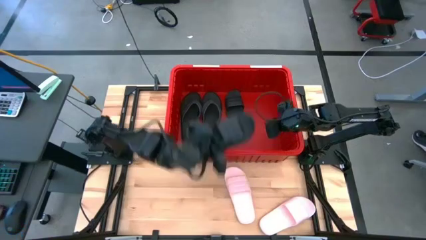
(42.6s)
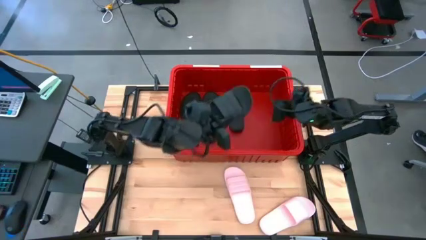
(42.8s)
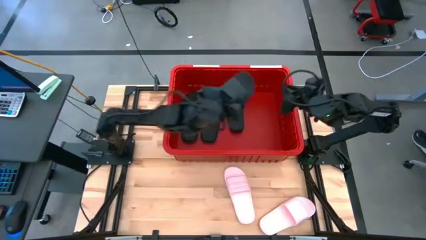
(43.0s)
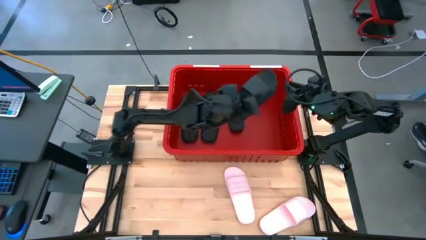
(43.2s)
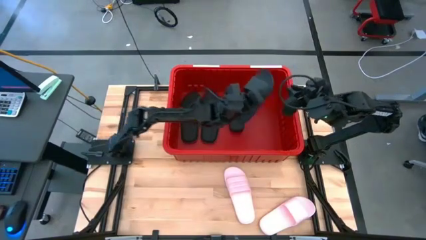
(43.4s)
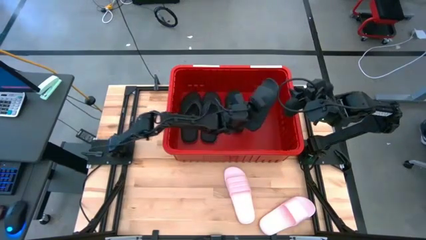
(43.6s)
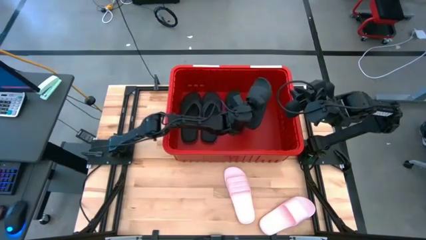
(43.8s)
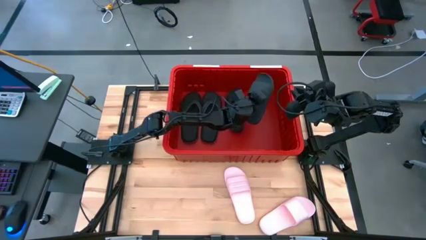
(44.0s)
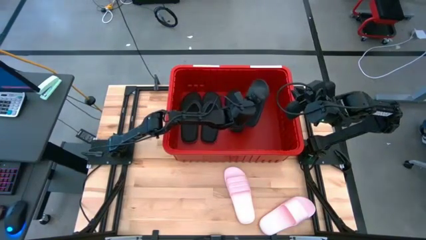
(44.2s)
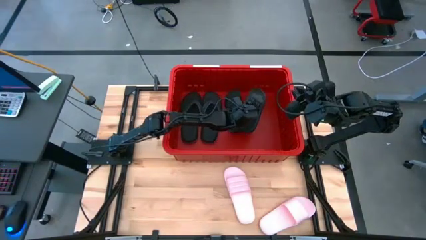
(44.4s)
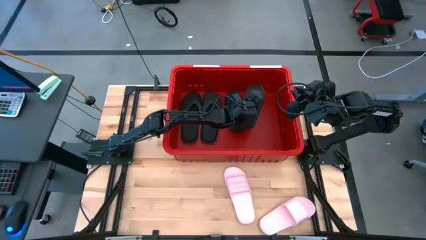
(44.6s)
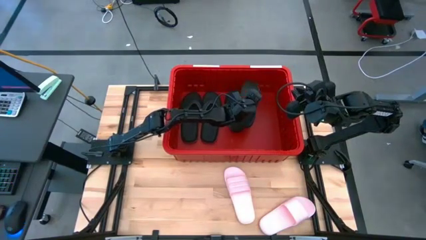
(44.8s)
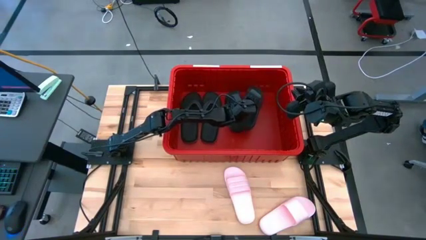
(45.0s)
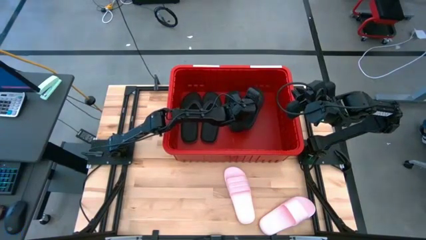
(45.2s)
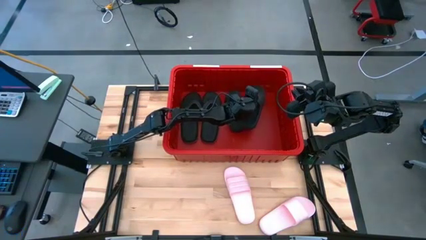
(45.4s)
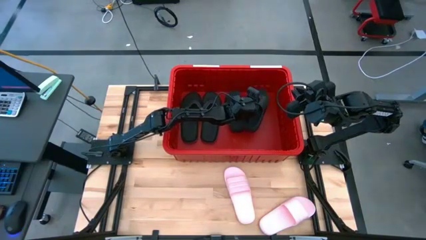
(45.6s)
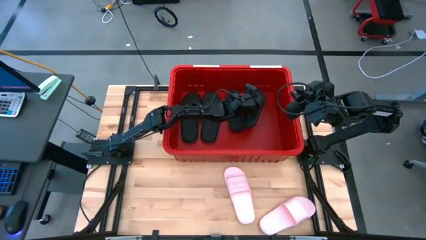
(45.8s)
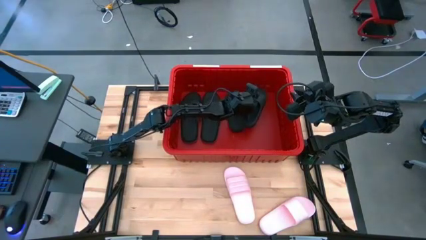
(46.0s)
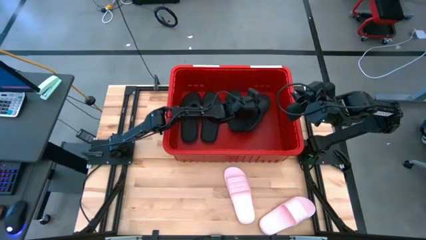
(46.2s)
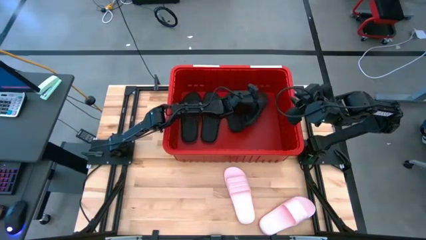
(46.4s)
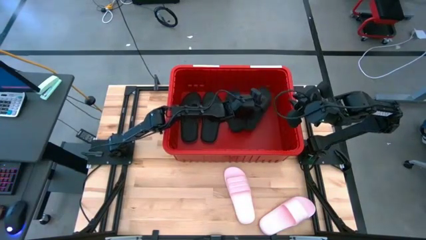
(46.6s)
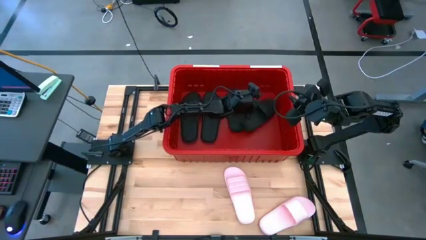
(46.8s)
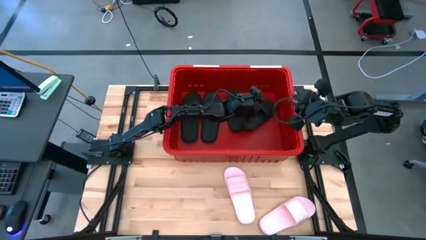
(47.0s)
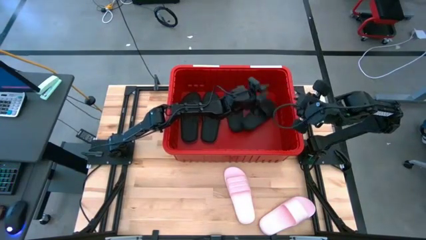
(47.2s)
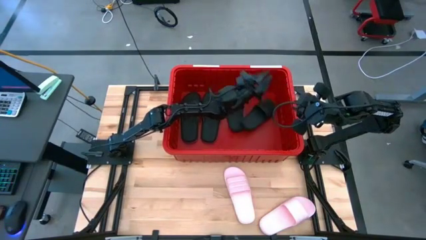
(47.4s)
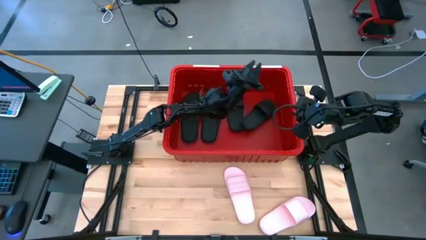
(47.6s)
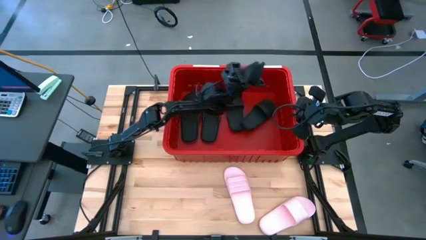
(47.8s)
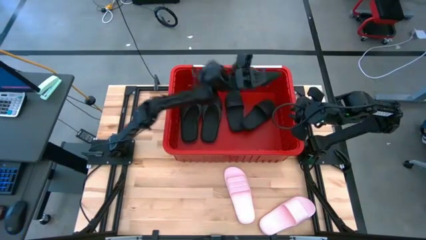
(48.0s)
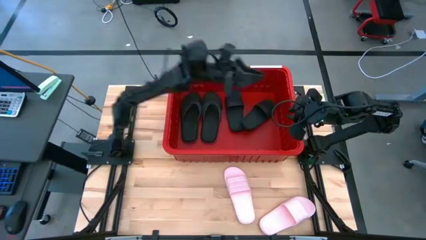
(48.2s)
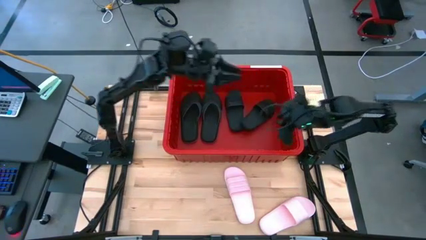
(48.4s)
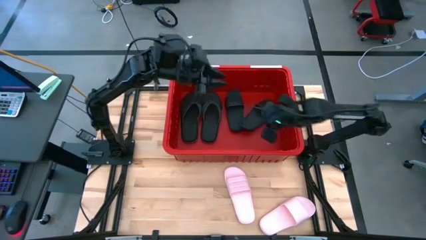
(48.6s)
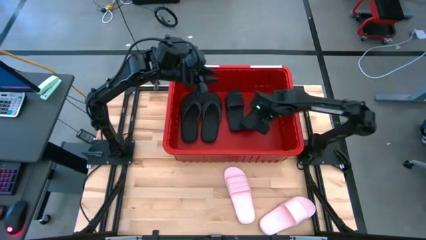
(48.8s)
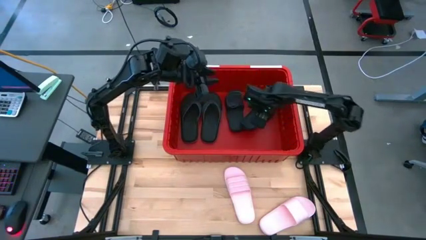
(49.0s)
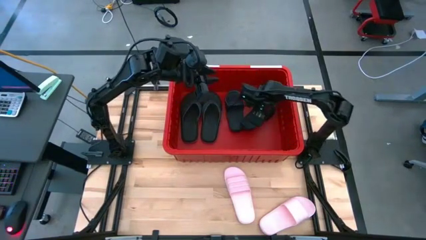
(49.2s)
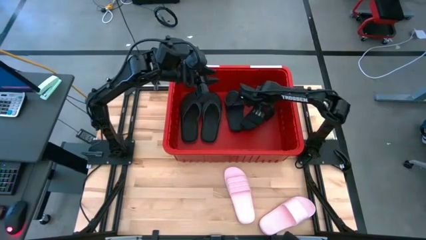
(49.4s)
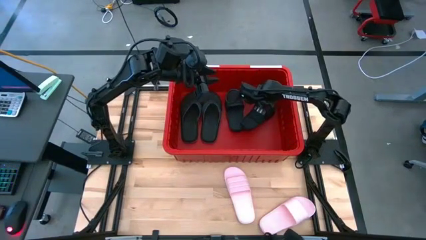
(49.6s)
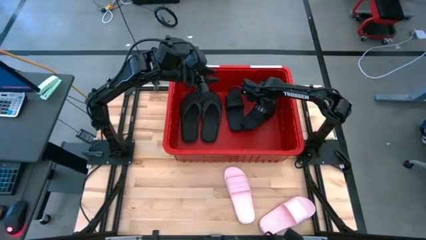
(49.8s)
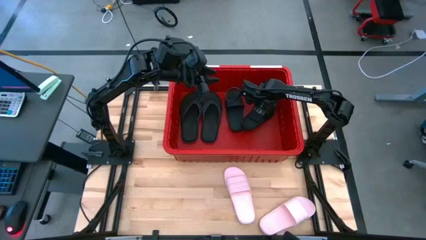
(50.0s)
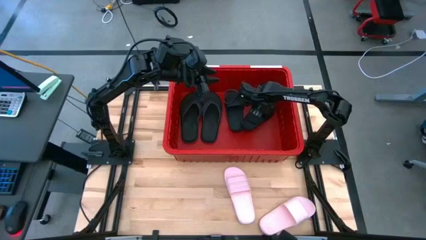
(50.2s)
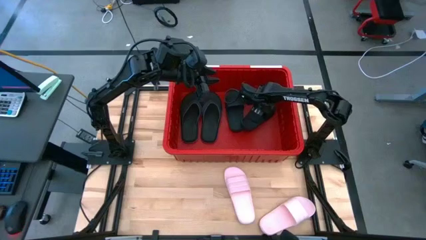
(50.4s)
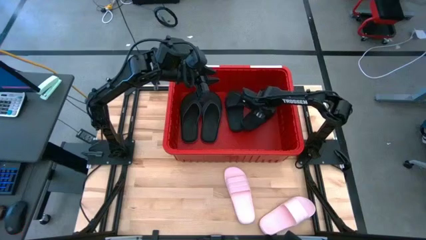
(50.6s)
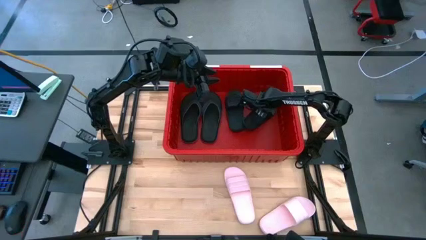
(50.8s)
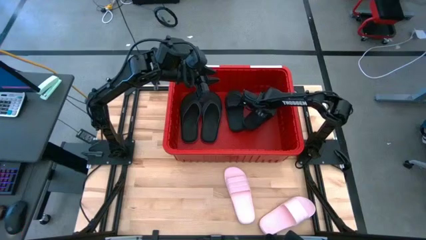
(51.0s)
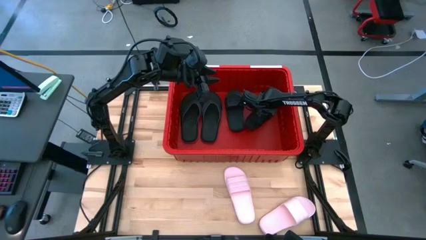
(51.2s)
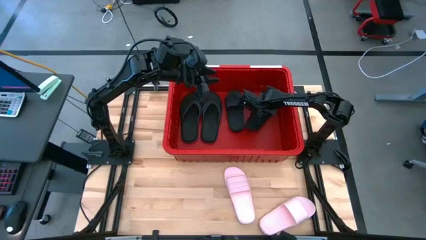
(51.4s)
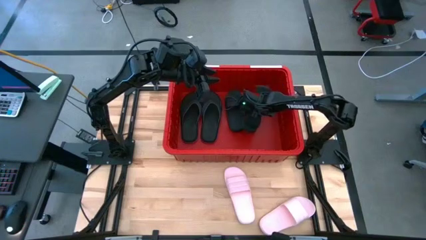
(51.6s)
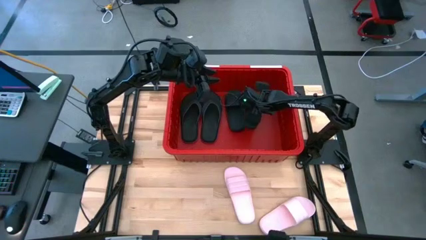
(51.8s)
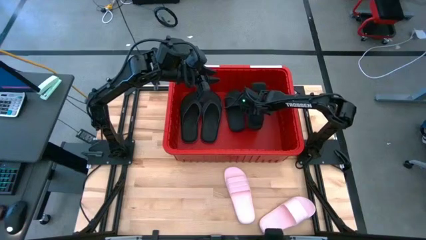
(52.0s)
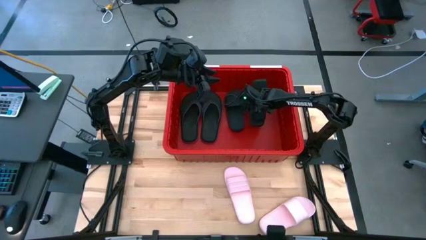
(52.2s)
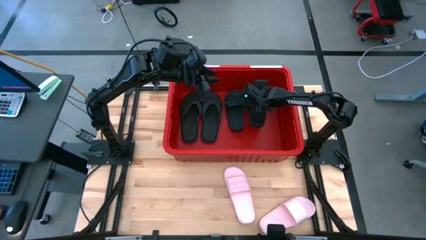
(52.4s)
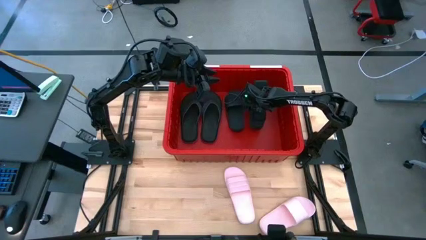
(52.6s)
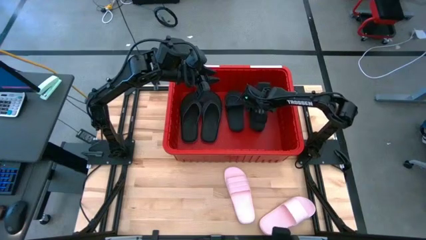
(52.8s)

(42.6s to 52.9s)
Task: Pick and place slides into bin
Put the black slide into the red bin

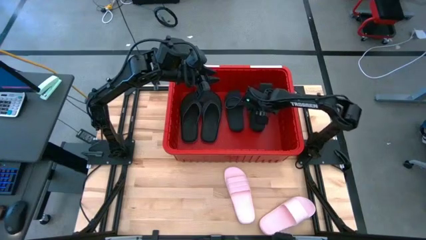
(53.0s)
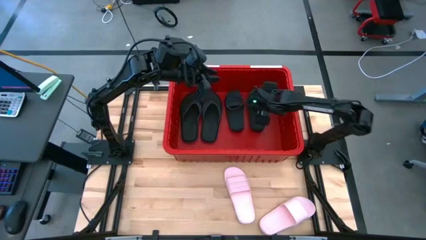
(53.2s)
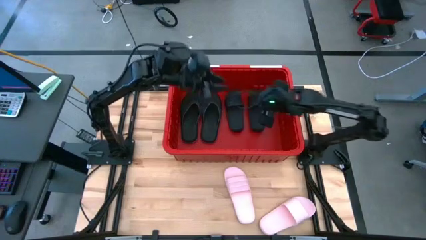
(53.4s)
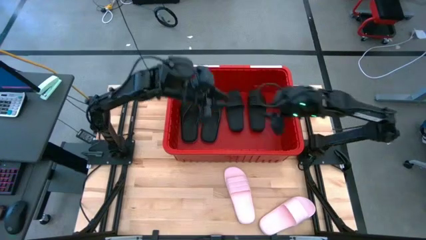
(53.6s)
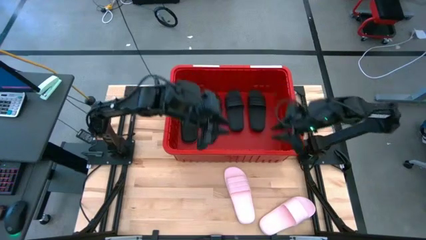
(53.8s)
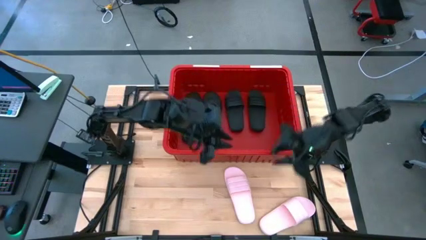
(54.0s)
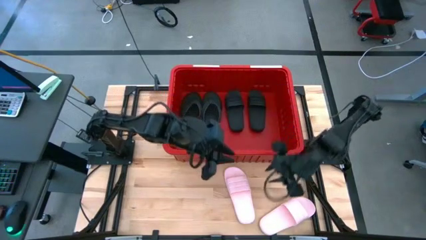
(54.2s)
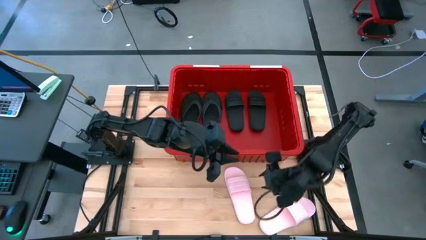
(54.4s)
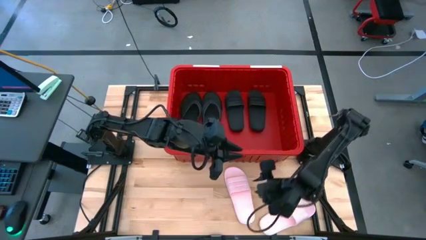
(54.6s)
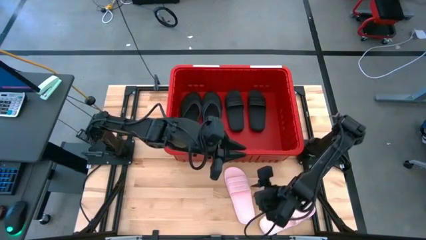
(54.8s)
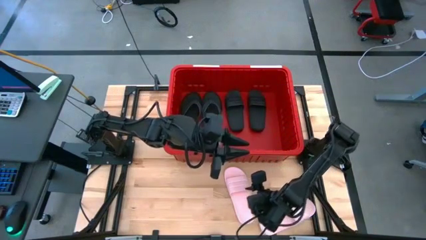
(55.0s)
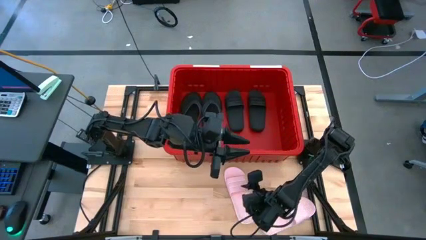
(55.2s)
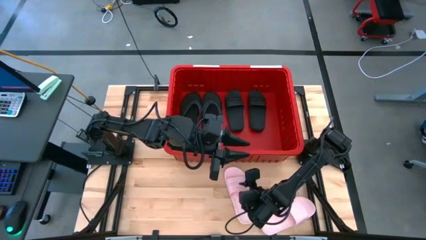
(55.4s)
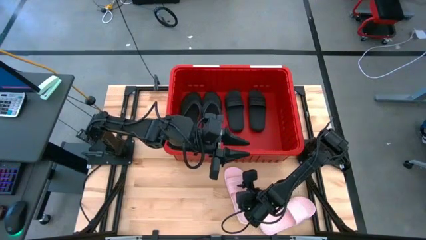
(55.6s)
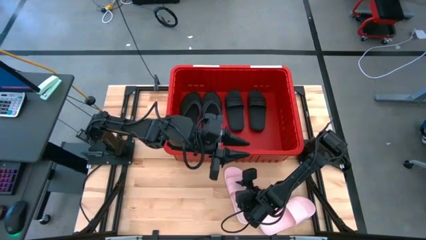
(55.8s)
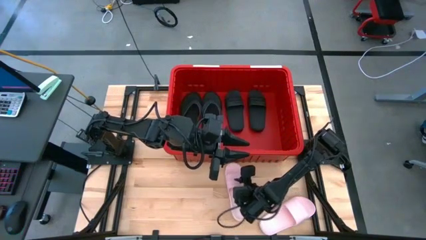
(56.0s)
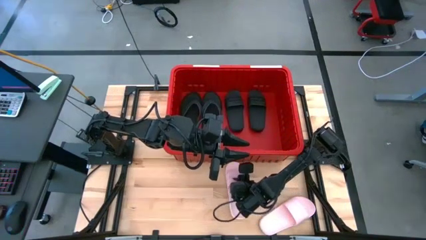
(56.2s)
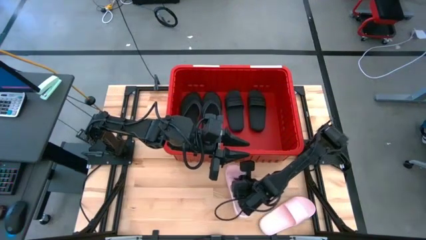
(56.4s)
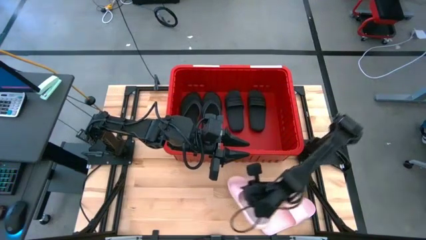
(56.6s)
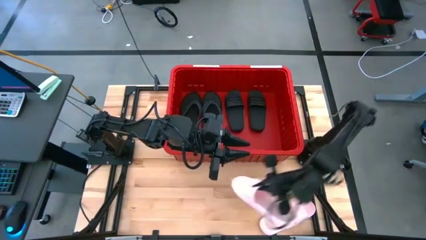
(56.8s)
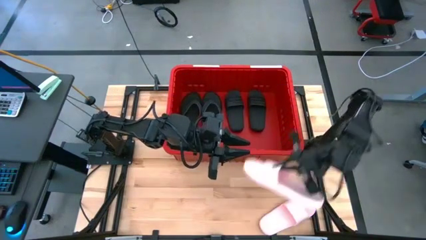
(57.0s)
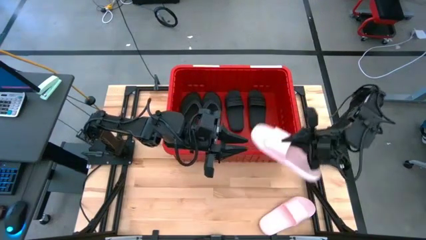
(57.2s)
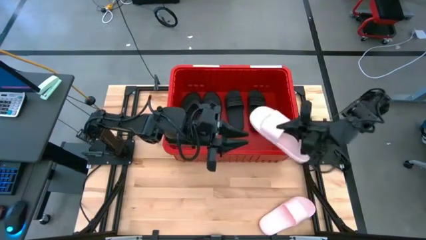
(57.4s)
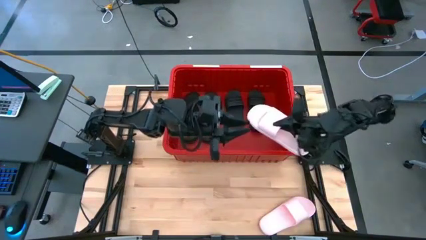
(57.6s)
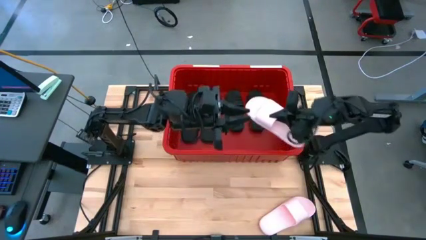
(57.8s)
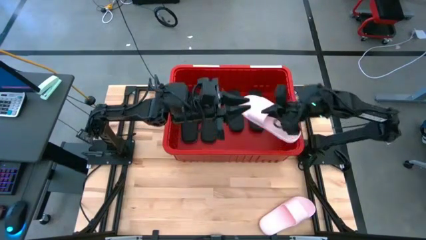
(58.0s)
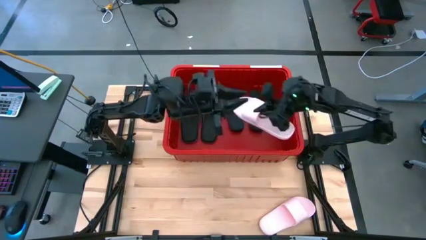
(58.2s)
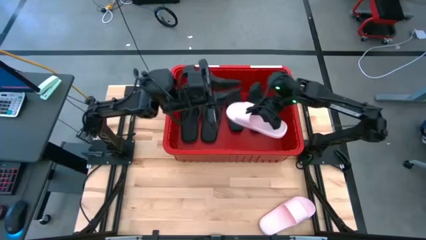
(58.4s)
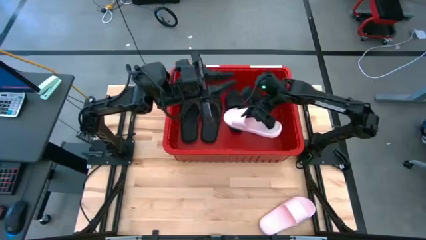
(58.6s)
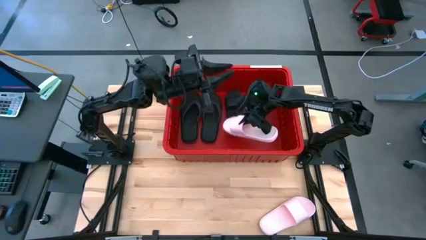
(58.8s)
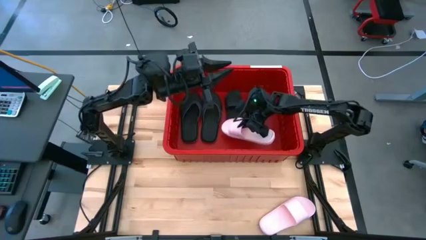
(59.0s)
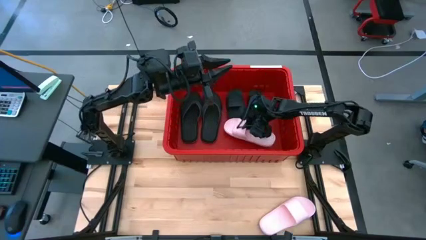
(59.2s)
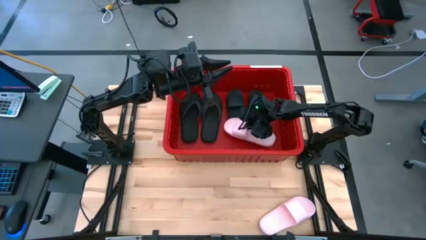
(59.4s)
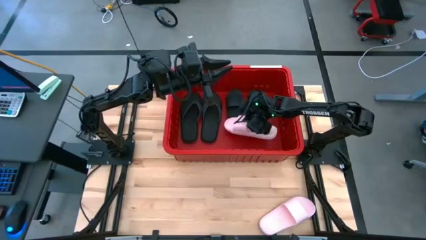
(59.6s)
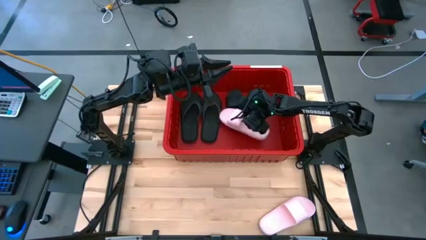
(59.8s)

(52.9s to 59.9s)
Put the left pink slide into the red bin
